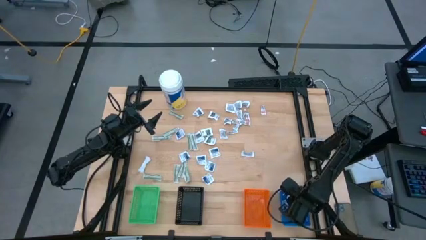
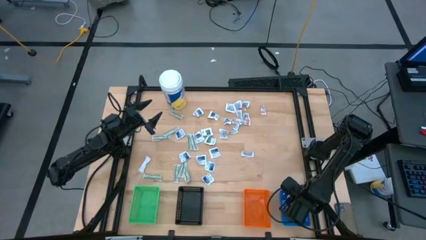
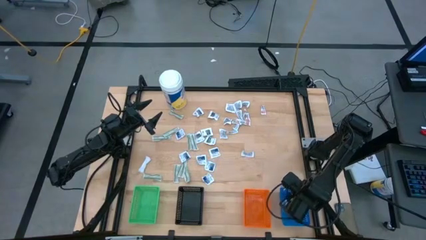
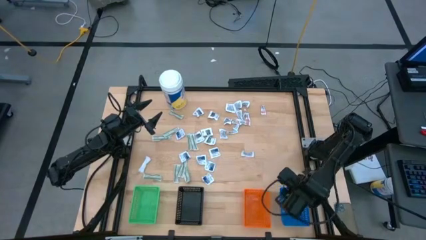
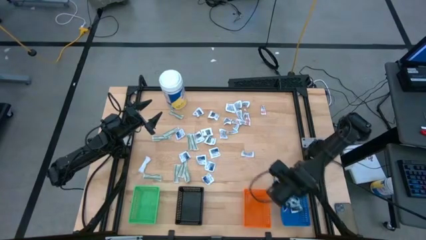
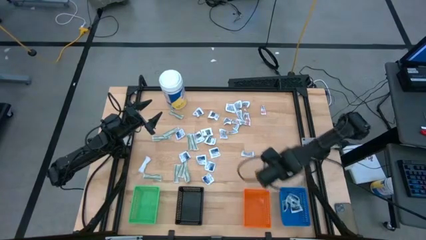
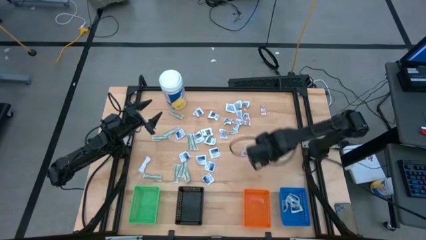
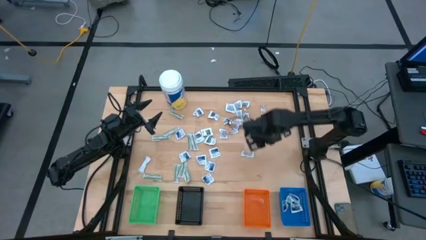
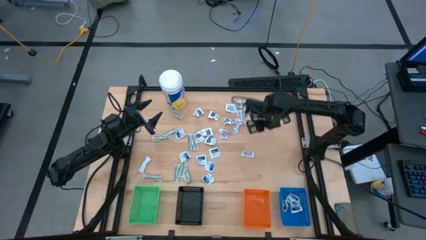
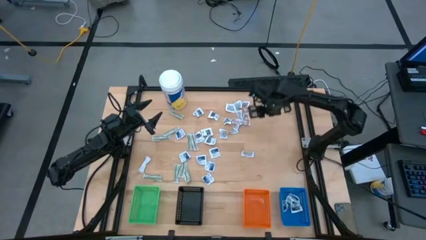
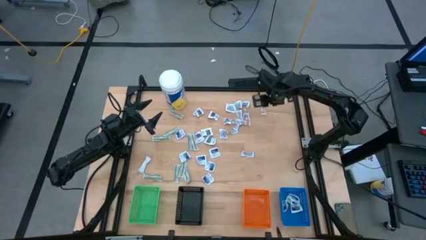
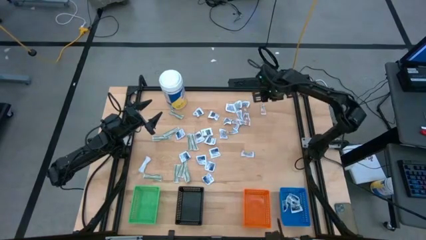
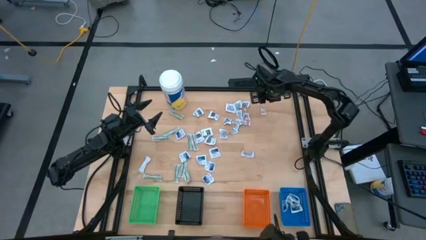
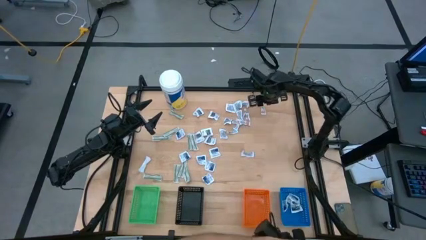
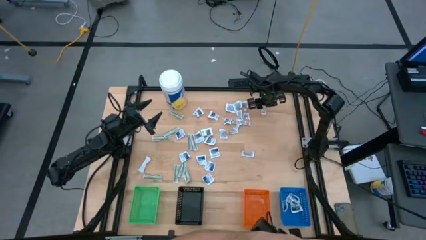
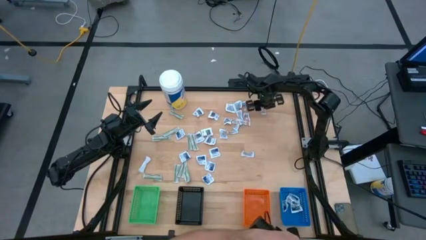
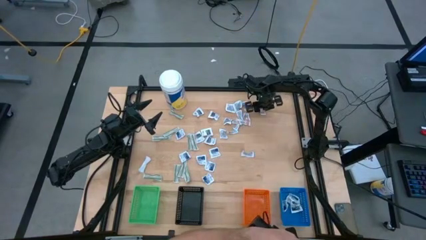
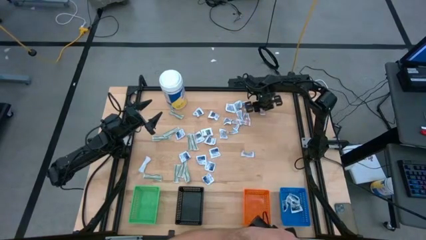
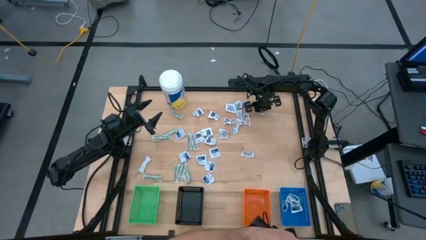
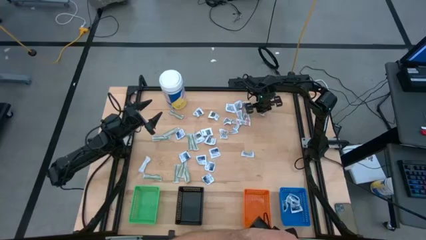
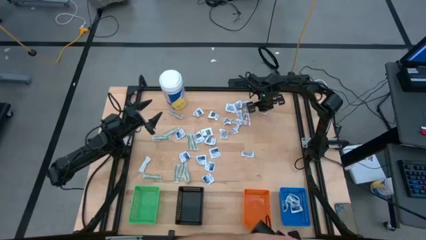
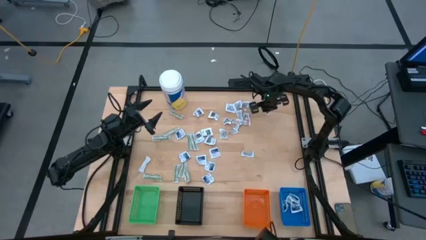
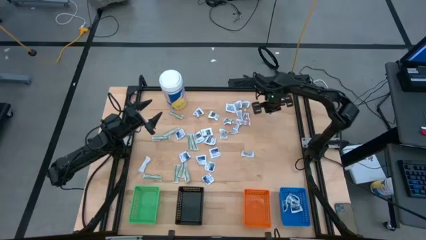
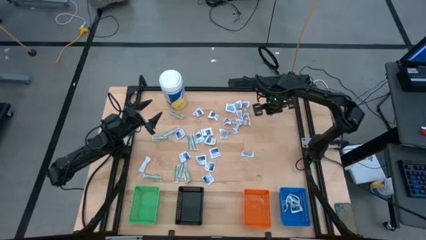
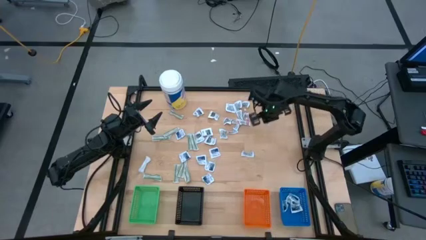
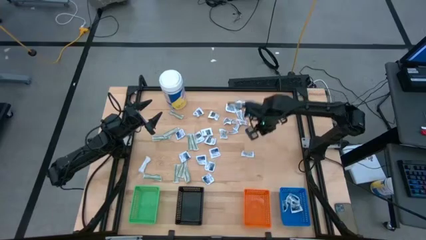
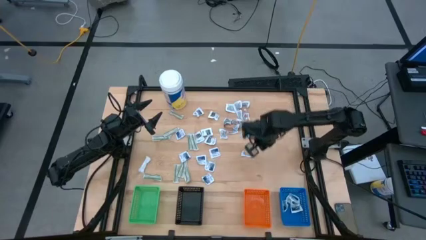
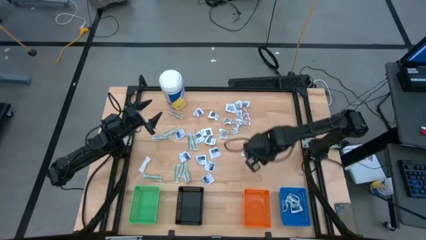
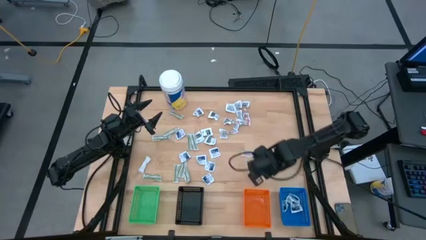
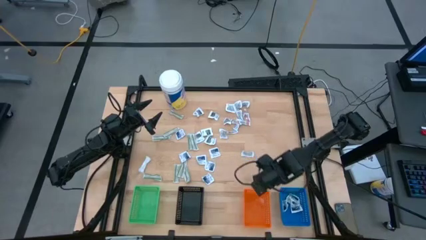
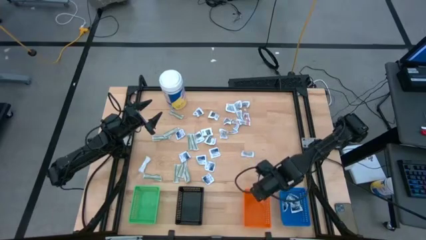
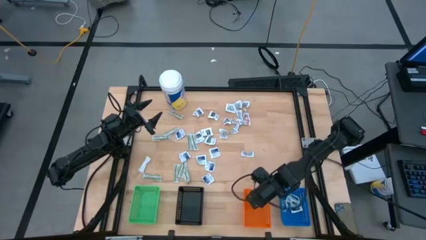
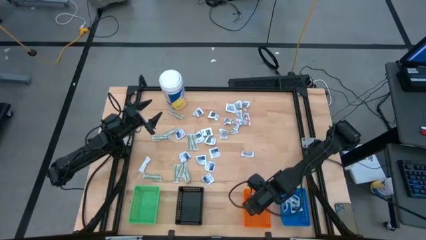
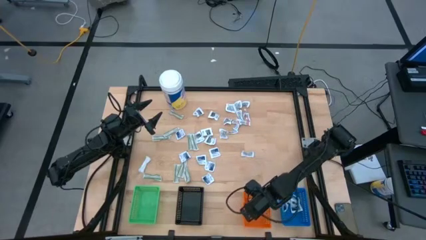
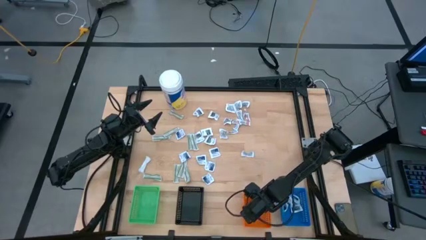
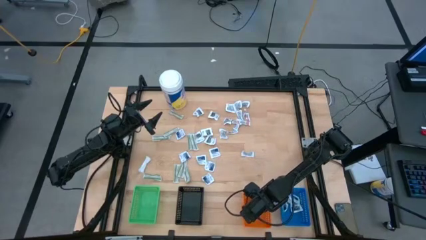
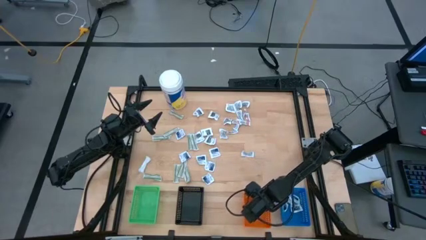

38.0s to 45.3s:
Task: Pick & Place First Aid Supplies
Put the ointment pack into the orange bin

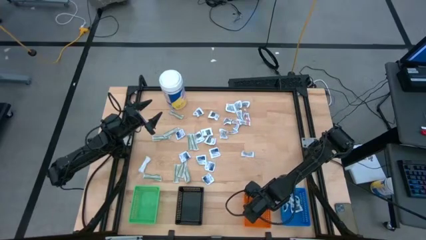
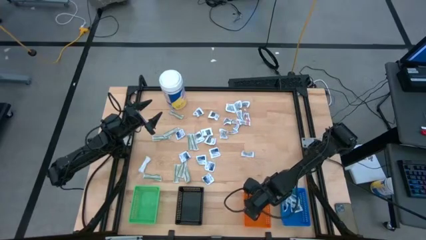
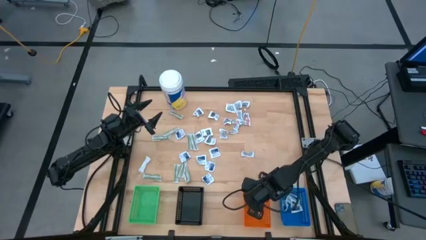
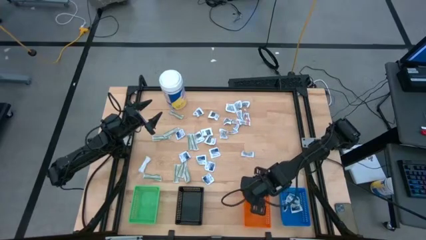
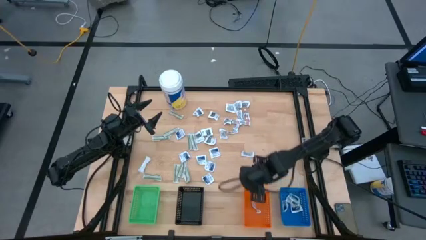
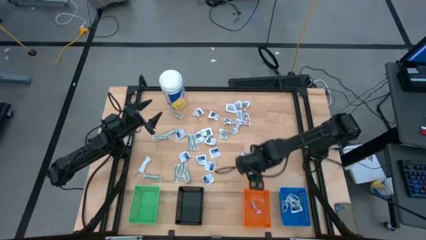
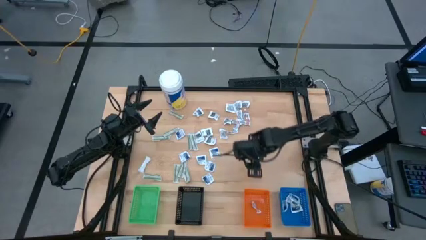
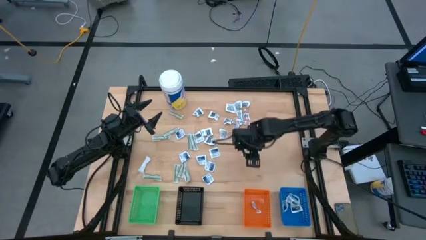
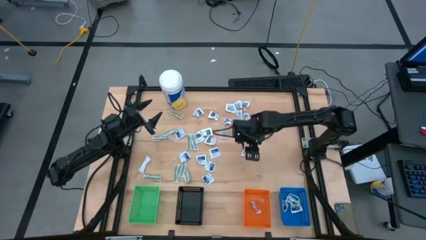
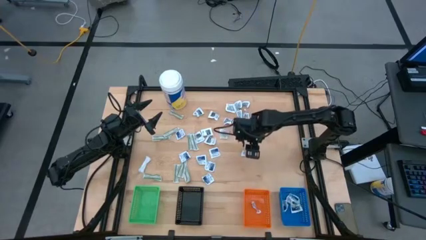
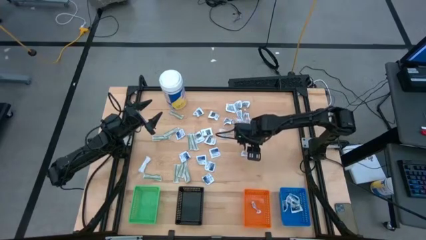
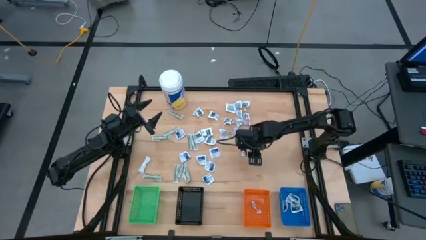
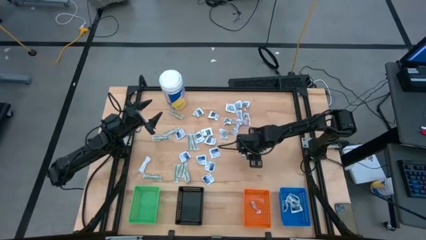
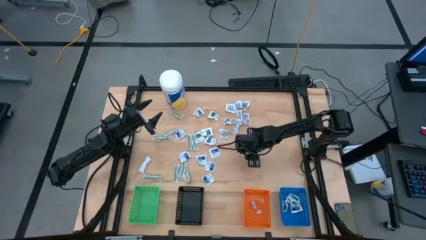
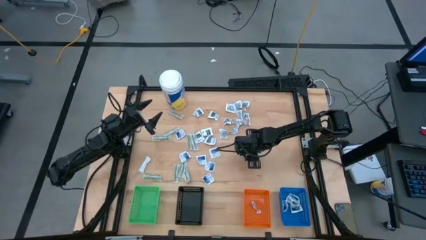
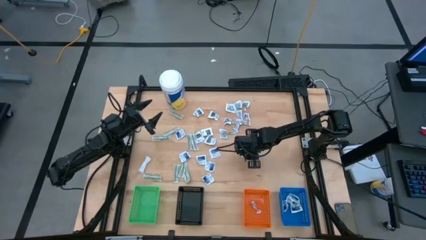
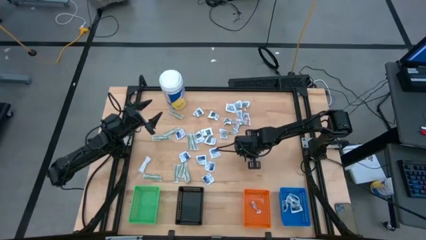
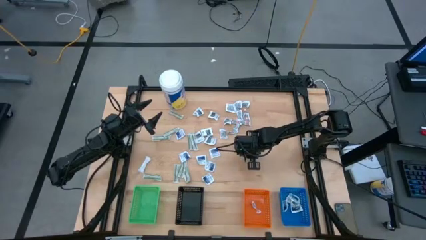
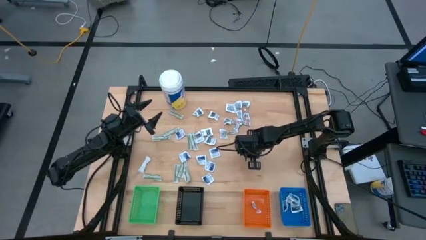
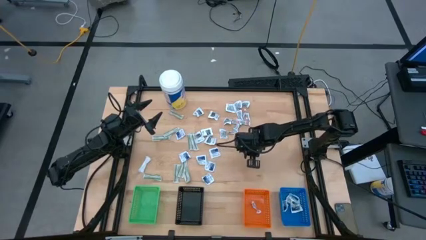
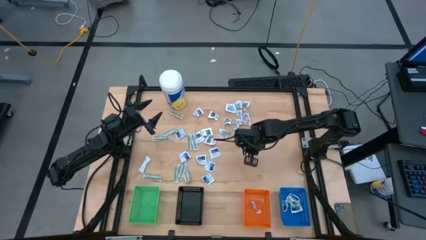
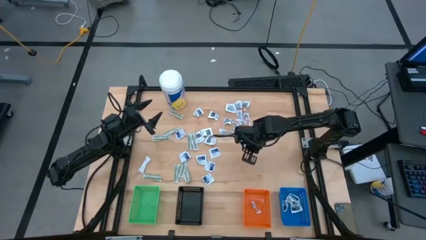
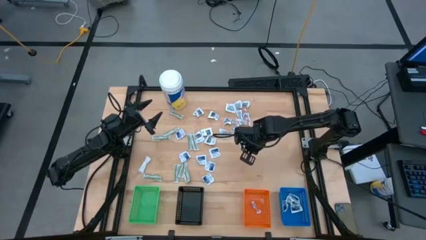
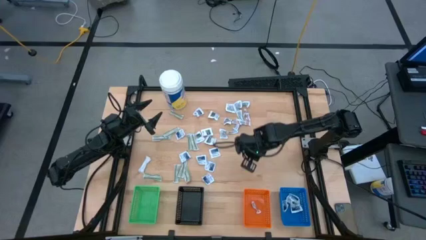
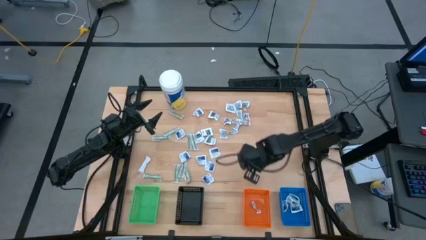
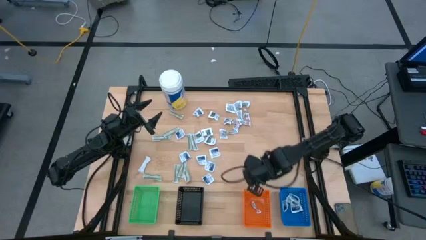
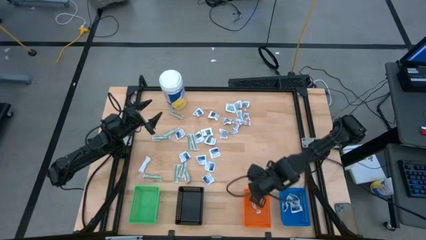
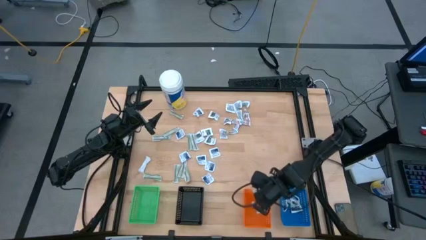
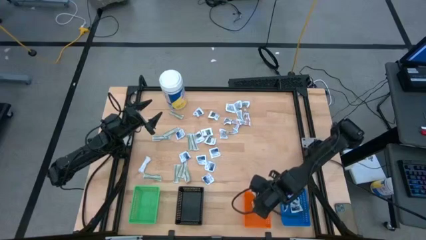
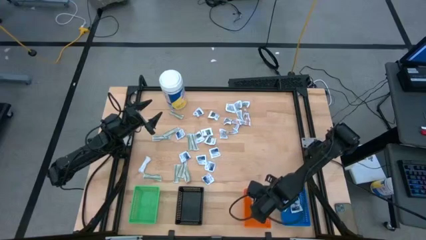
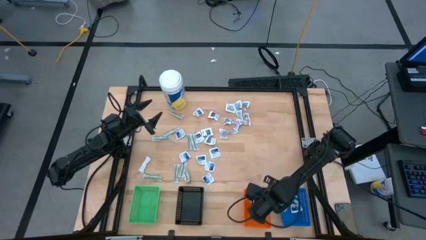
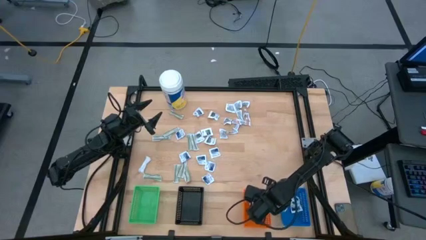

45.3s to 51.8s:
Put the ointment pack into the orange bin

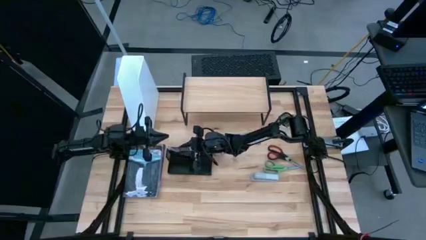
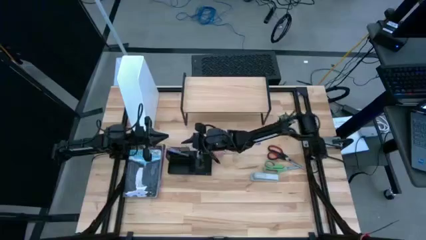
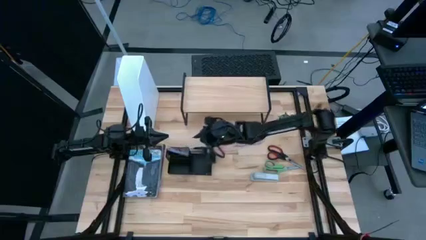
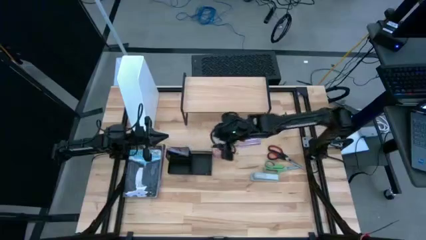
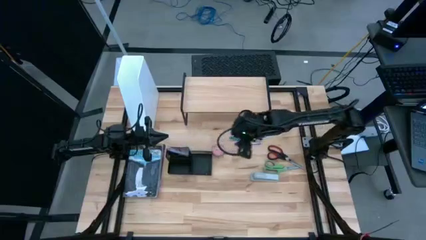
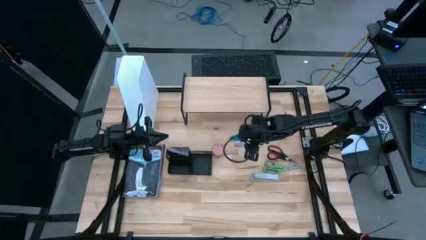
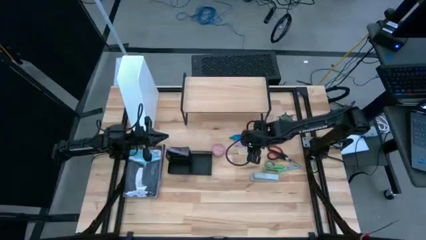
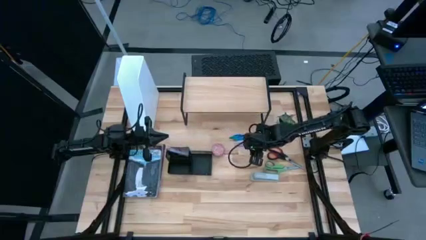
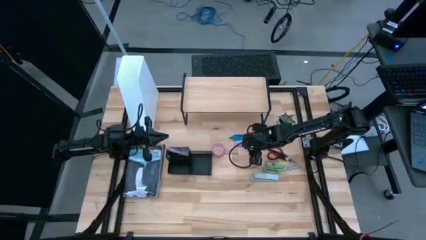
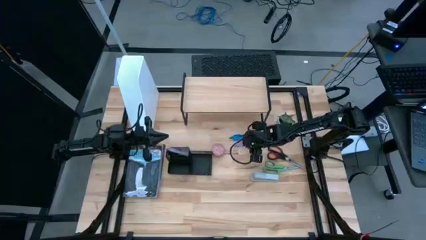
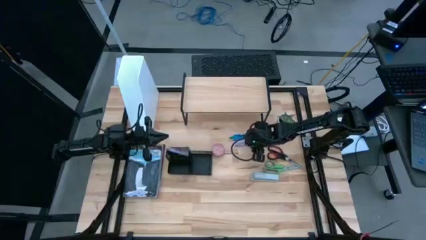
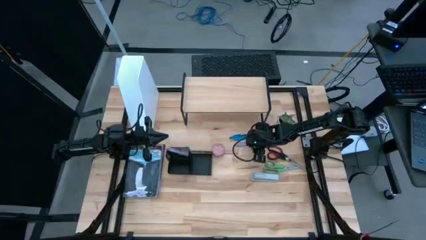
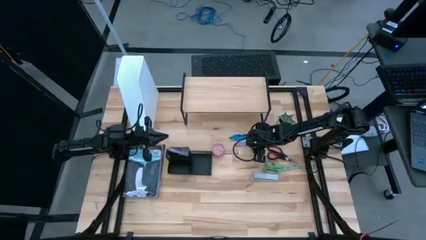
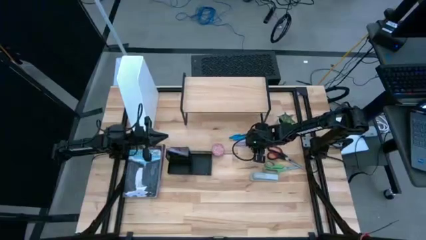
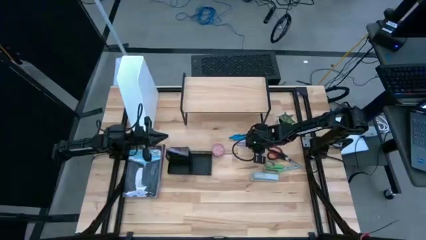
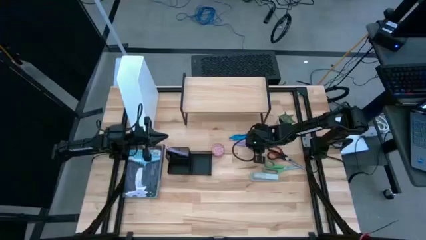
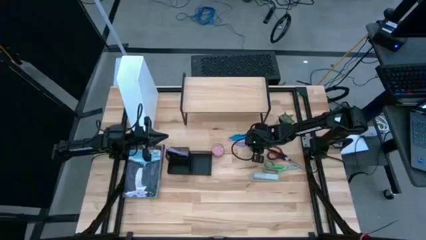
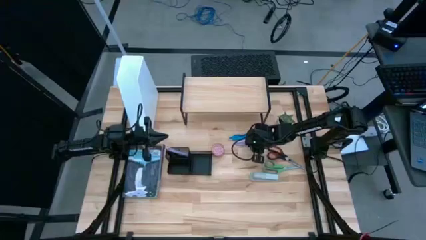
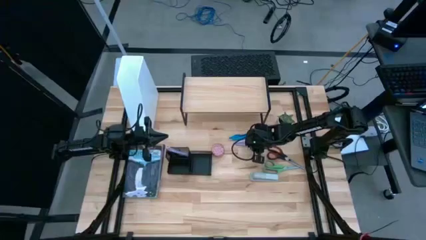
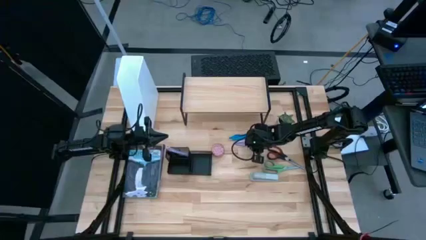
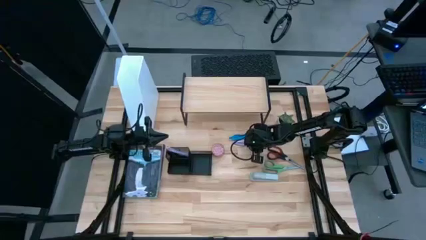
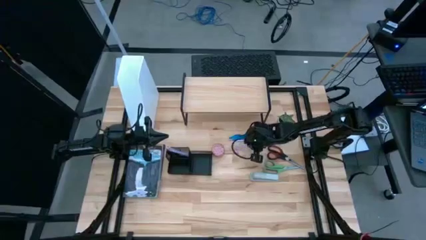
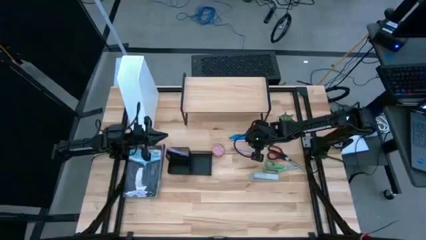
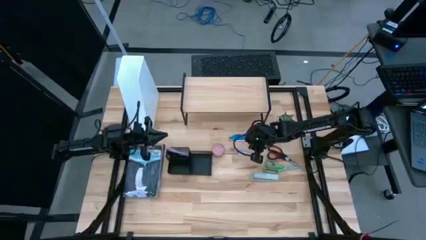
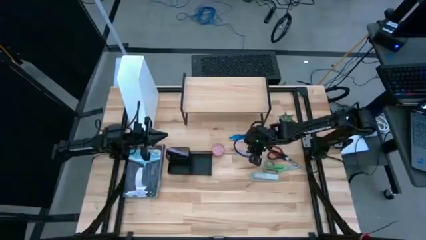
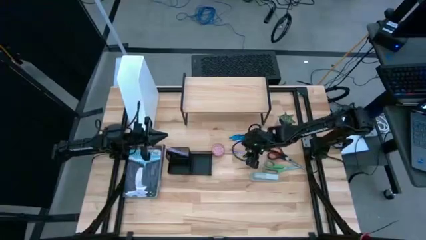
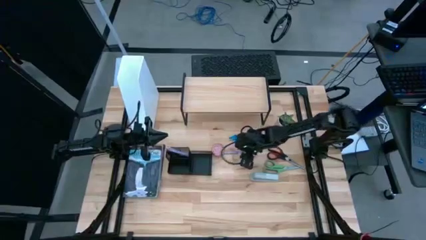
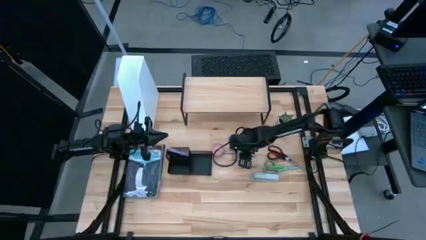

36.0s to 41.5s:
Task: Stock shelves
Put the purple pen into the desk organizer
